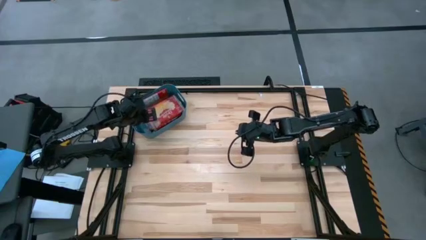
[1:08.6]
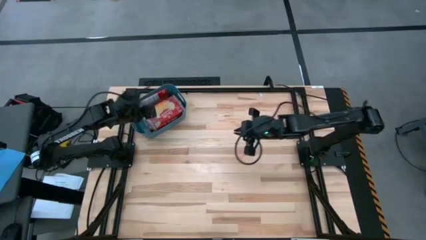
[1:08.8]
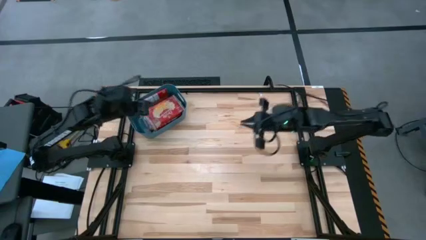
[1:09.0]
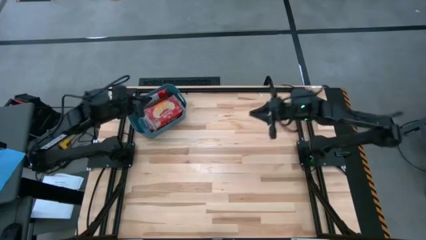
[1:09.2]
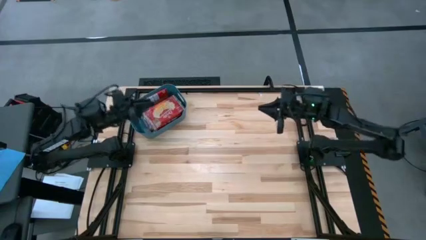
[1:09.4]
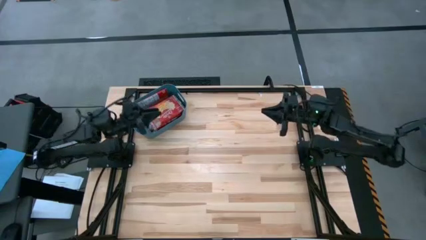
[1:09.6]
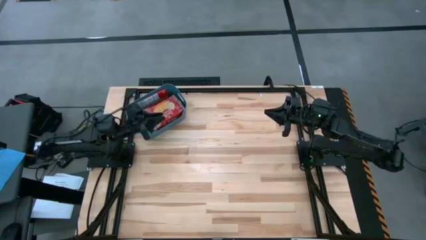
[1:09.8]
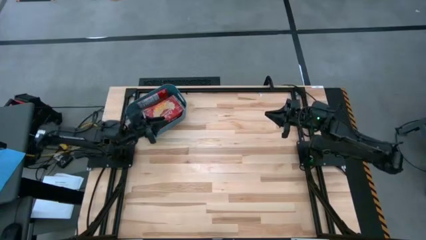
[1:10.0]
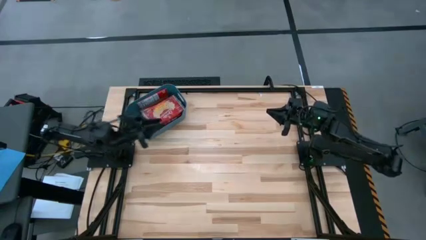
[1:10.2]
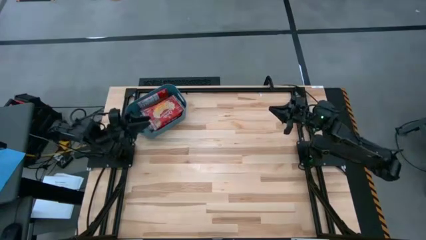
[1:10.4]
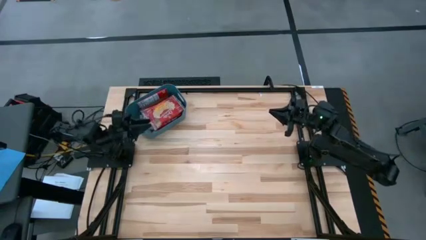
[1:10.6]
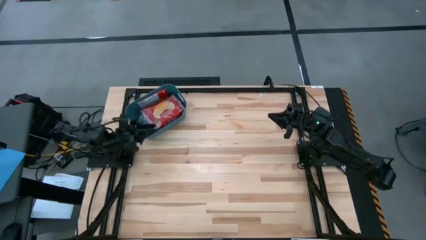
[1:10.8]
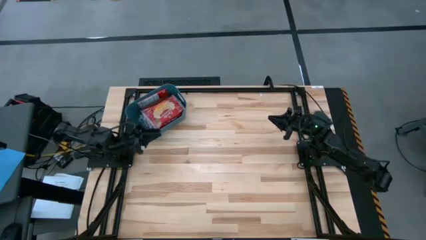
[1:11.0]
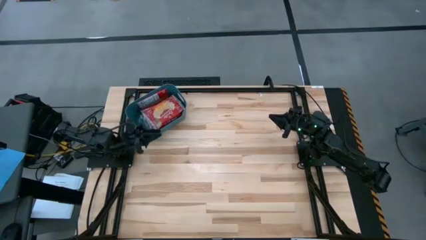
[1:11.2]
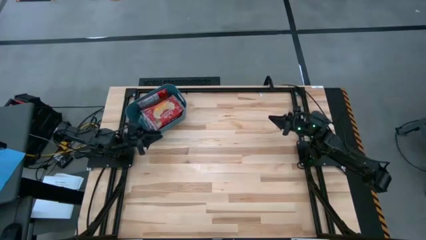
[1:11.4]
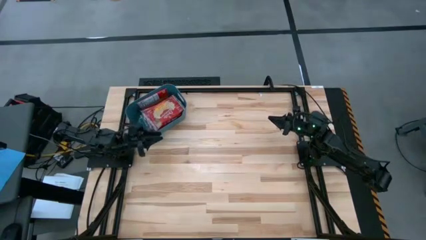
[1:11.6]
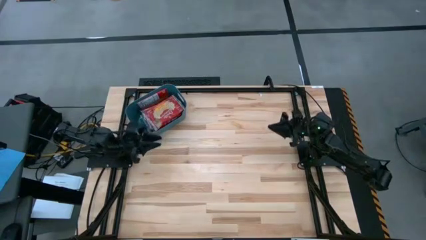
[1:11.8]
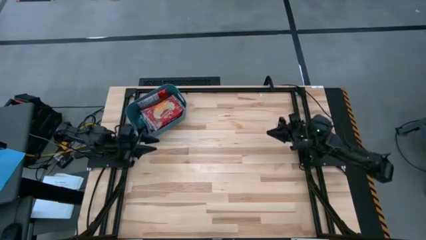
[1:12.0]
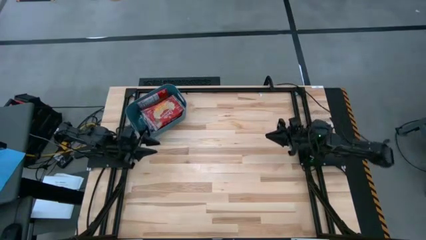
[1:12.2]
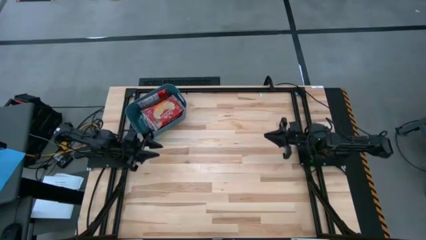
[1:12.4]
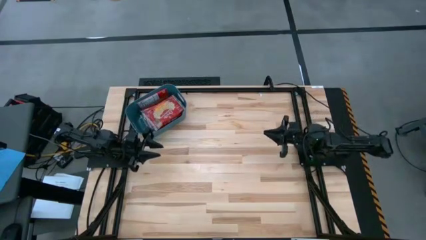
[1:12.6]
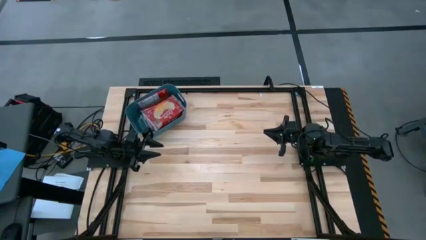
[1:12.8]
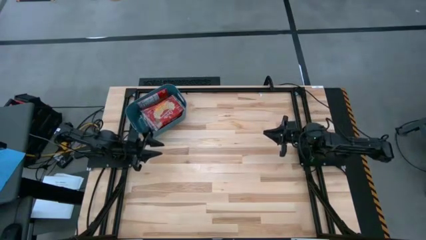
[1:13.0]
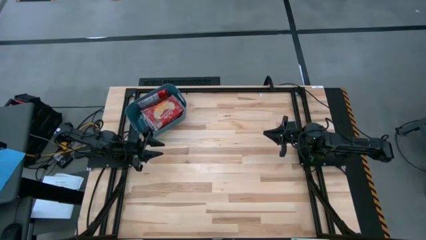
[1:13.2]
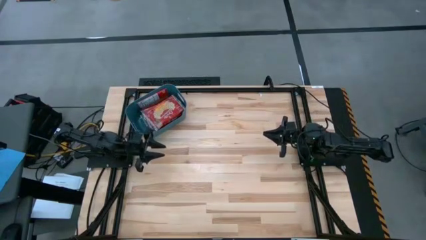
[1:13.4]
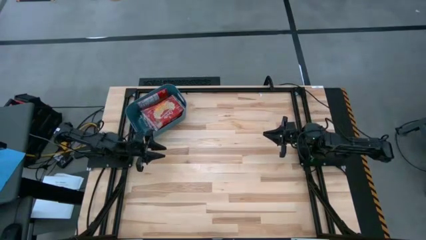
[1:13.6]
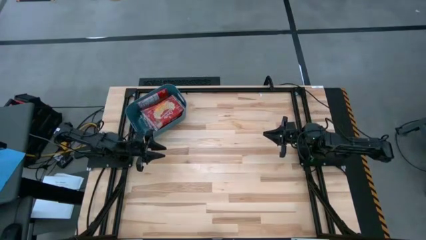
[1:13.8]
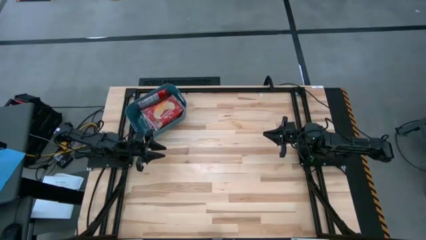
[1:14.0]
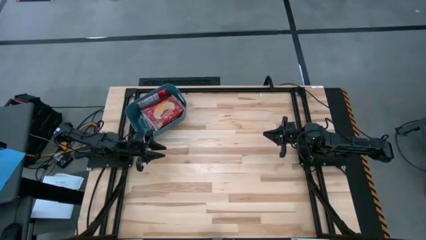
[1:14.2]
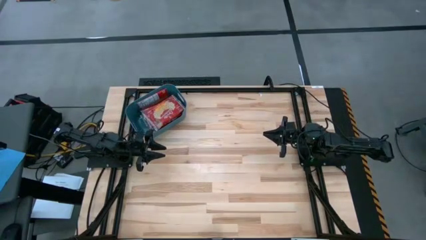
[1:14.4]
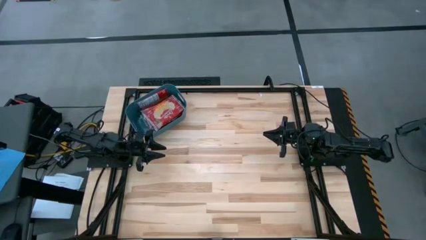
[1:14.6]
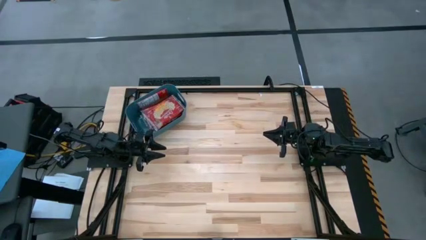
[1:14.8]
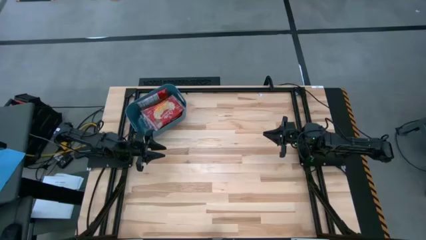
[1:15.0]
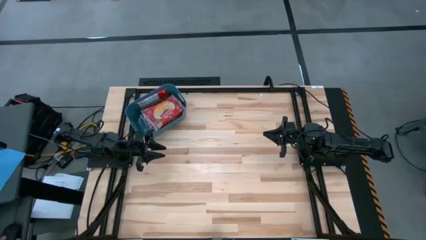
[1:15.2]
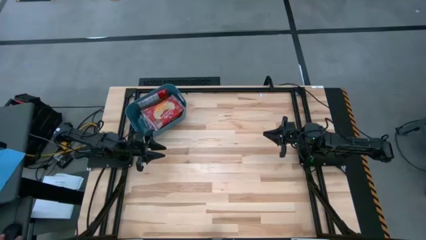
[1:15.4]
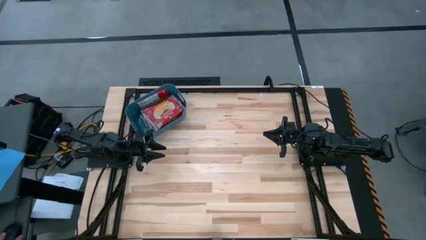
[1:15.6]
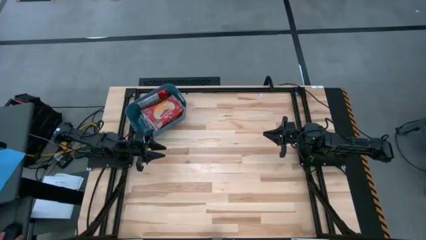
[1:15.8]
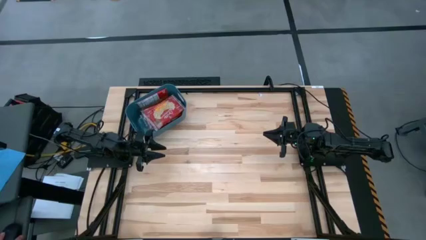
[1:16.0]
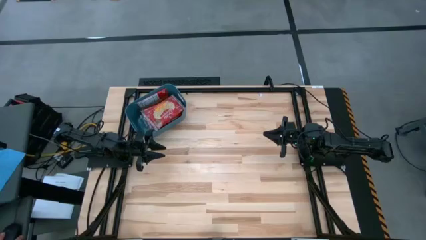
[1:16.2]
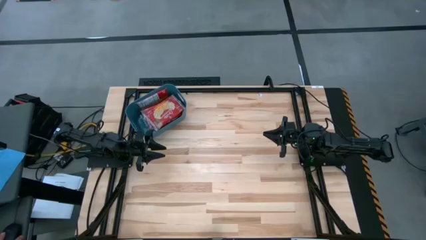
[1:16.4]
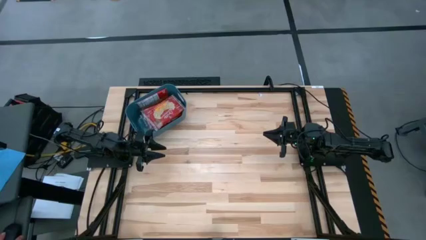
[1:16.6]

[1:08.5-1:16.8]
Task: Sort popcorn bags into baskets
Return to Home Position

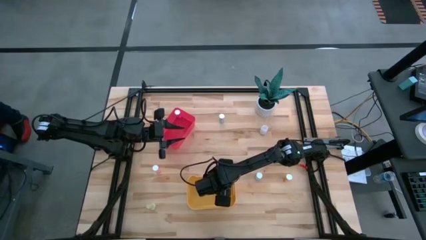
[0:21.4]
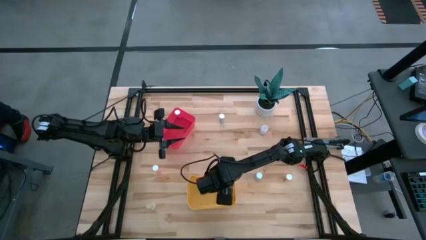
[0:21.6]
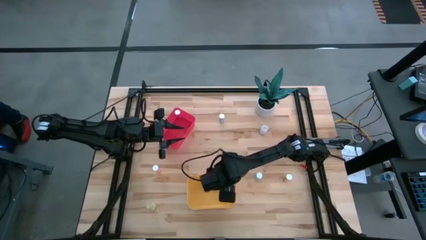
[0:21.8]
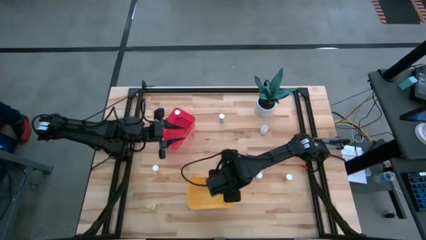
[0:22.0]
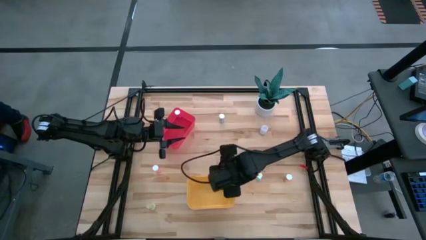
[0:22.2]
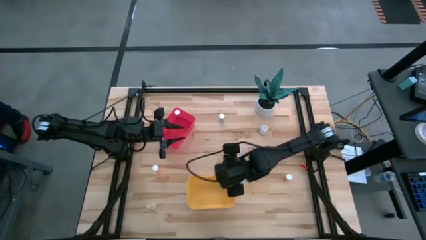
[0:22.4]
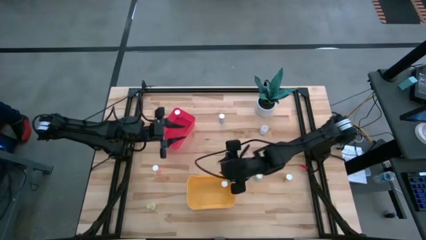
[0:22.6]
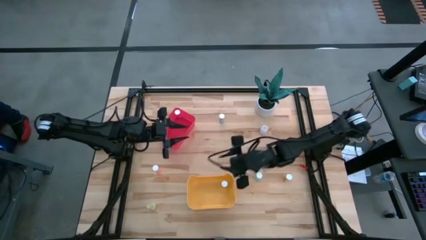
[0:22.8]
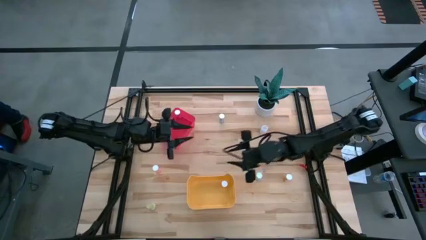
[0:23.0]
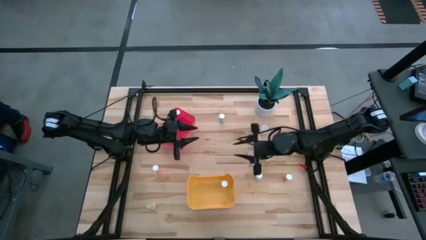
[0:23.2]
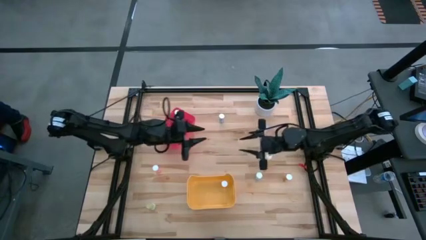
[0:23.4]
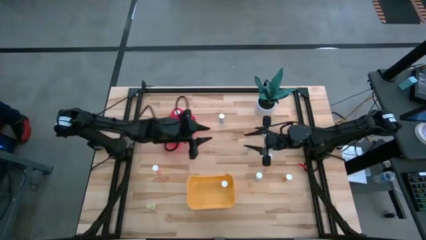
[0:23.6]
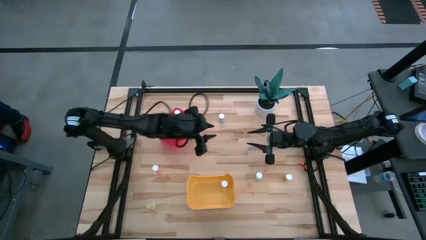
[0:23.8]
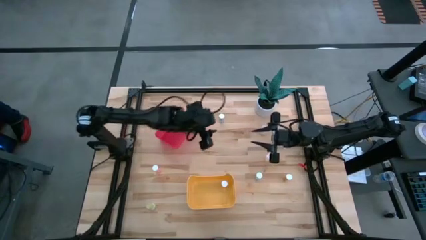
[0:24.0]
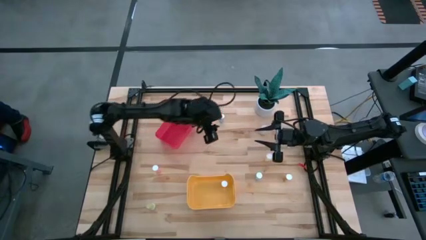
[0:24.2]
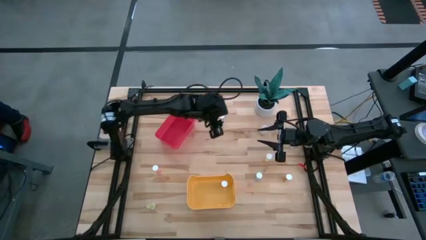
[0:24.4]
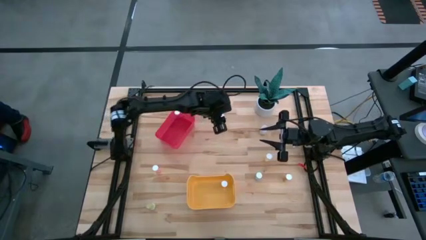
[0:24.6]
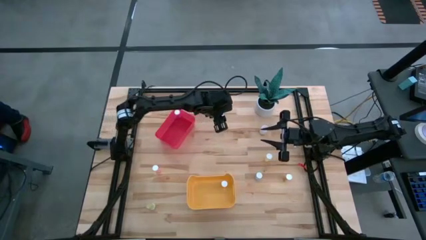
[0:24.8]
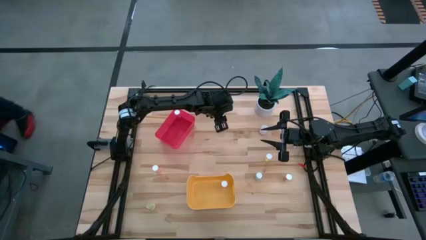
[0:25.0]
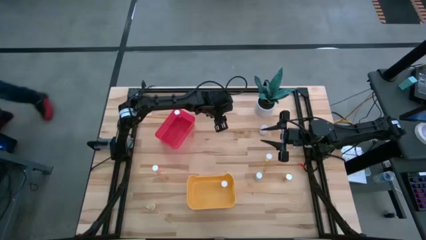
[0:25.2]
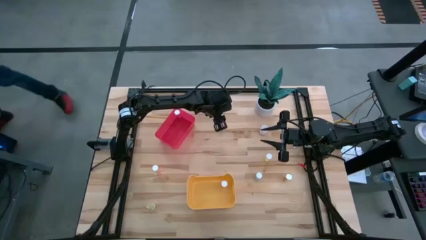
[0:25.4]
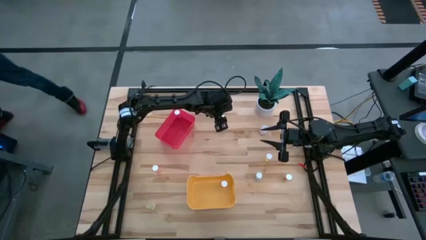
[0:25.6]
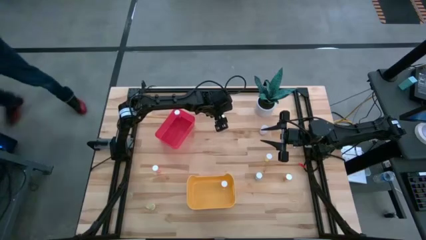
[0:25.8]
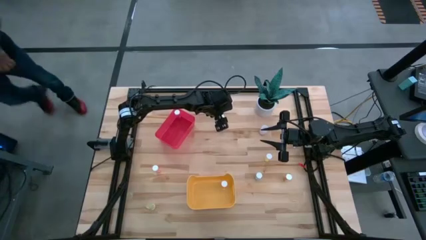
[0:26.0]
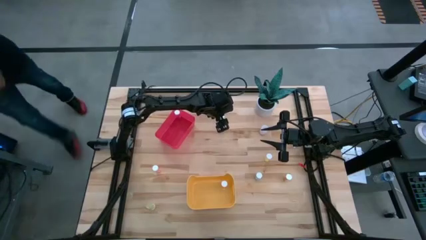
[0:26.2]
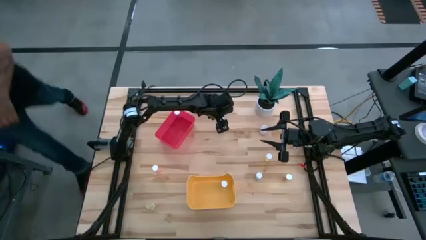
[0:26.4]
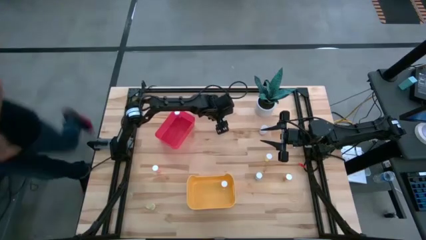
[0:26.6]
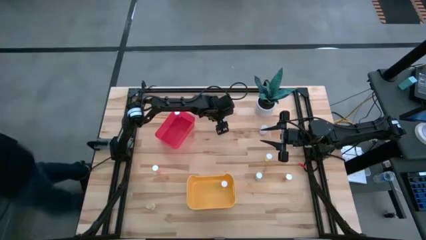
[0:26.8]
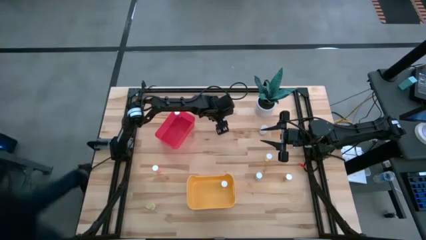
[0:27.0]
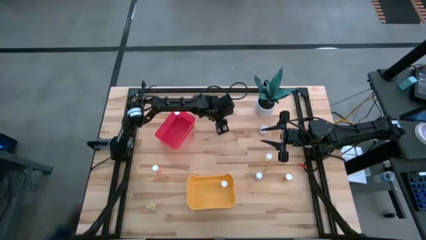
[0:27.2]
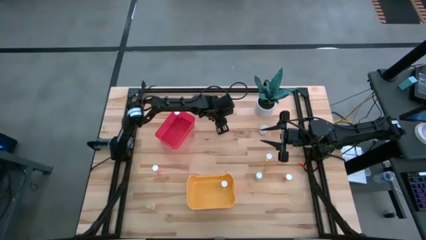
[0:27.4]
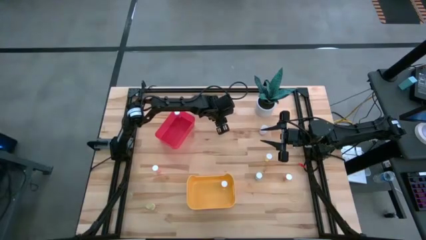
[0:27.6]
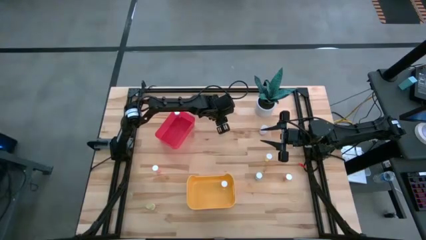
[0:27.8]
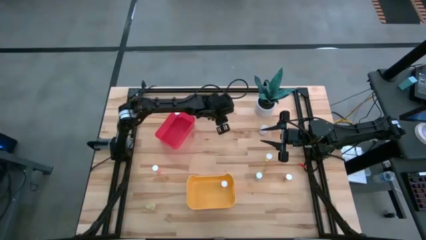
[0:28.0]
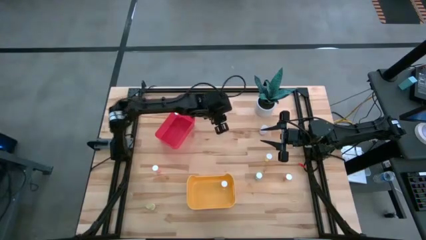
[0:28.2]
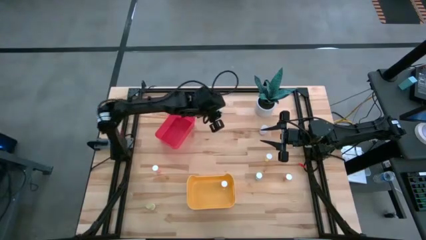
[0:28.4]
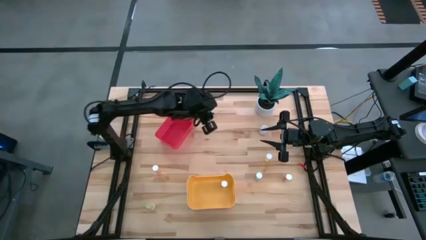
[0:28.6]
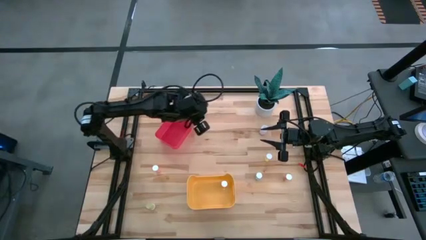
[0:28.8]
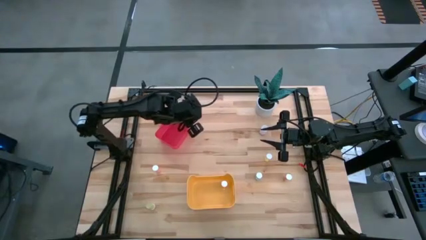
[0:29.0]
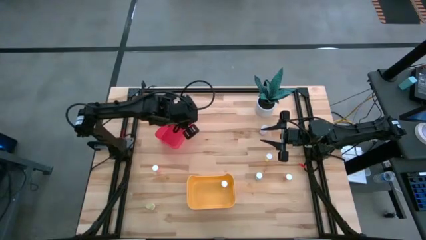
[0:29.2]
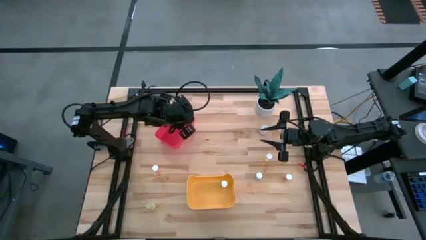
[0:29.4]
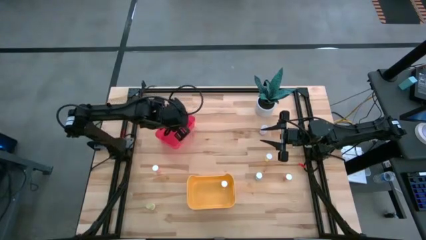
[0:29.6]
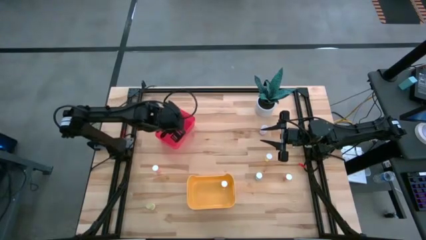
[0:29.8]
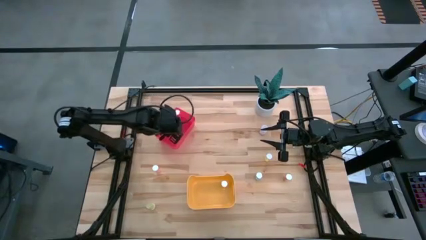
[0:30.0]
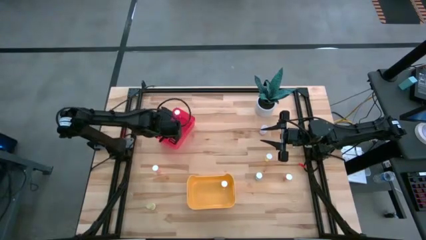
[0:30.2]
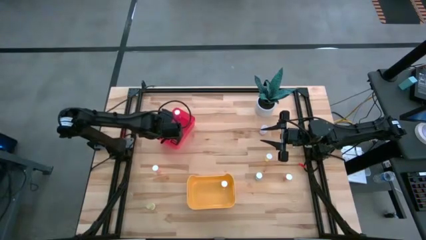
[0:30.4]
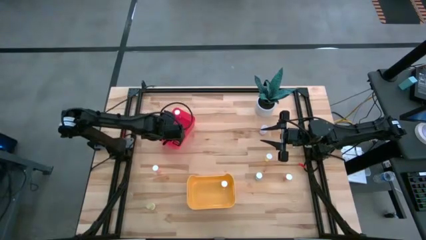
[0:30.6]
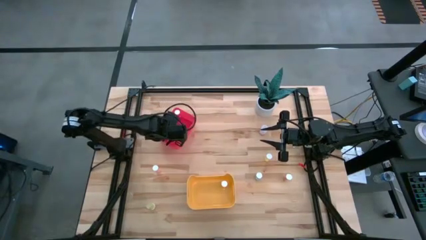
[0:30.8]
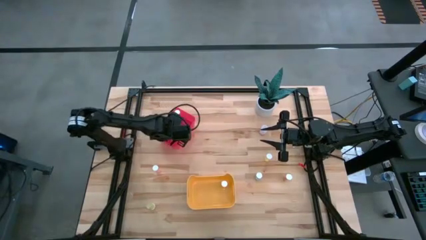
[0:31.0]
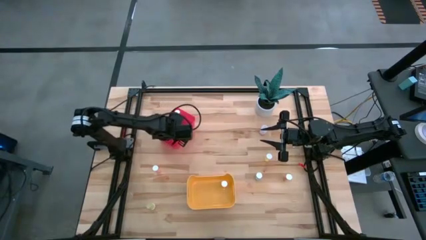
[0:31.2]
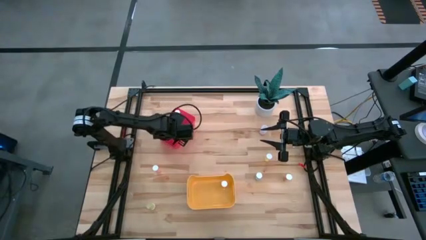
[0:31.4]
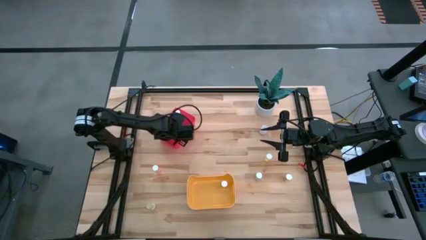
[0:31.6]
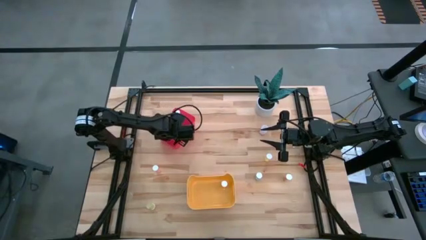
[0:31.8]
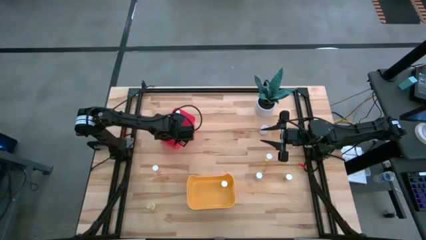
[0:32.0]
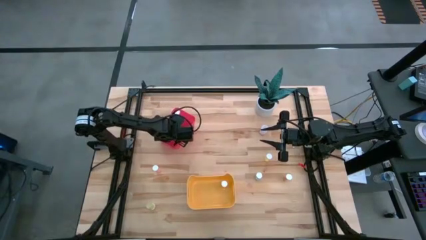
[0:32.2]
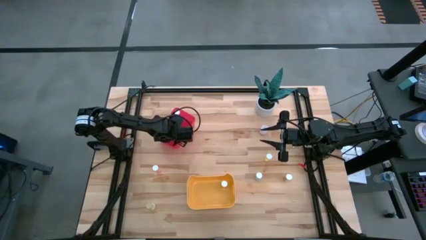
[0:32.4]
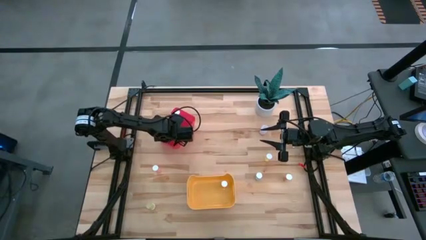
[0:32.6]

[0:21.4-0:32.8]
Task: Pick and place medicine bottles into bin by pill shape (circle, oval)
Put the blue capsule bottle into the red bin
